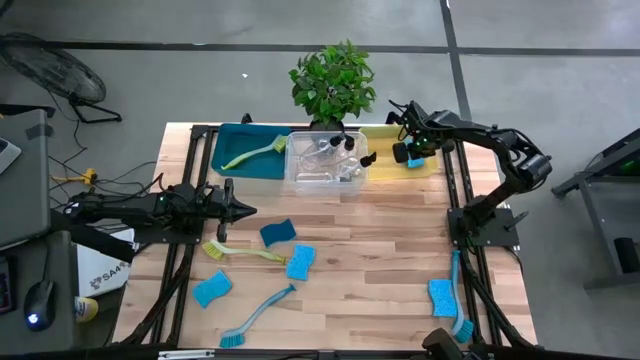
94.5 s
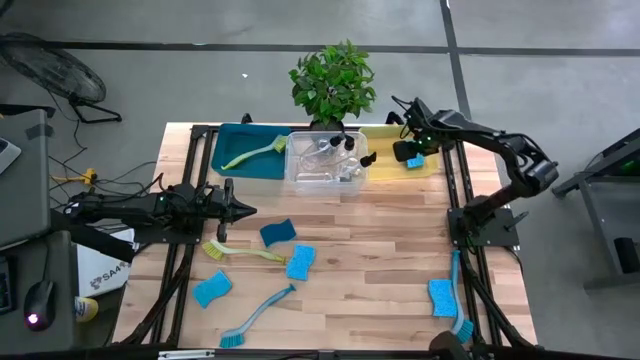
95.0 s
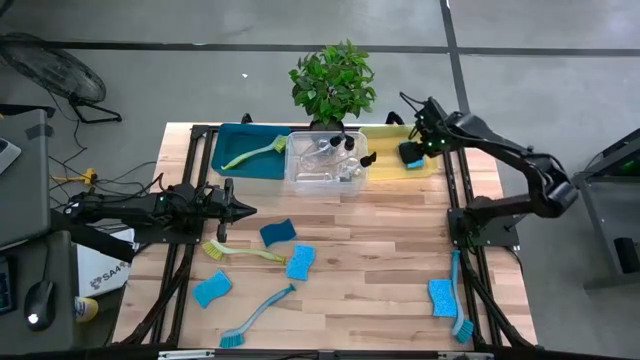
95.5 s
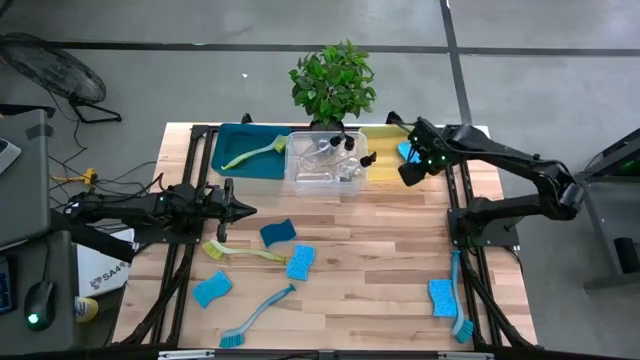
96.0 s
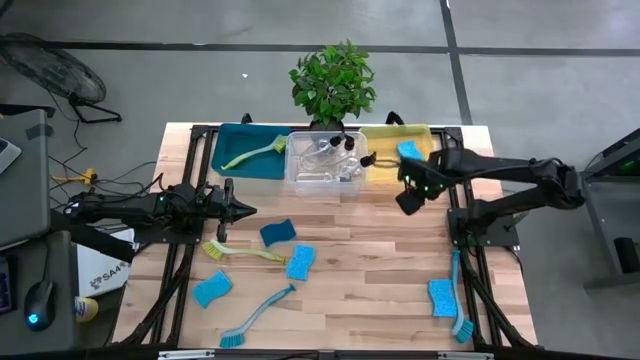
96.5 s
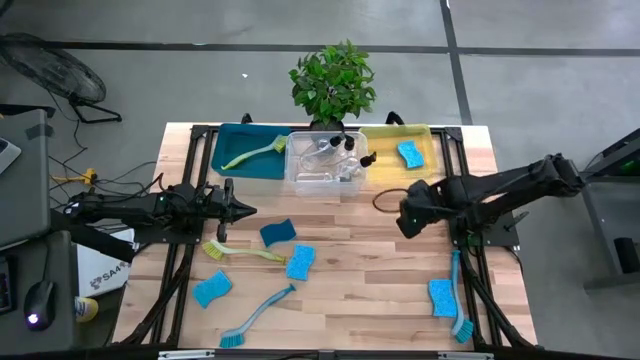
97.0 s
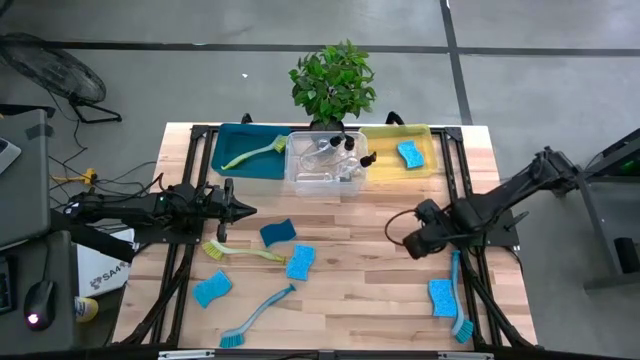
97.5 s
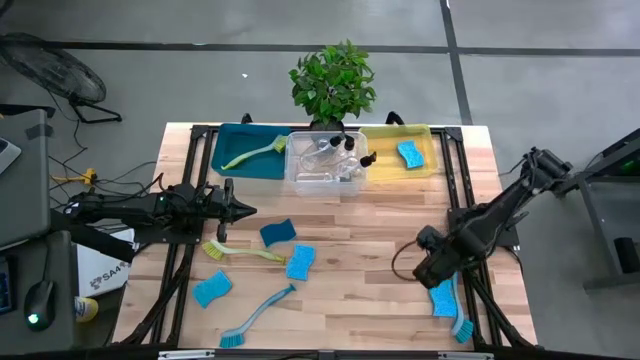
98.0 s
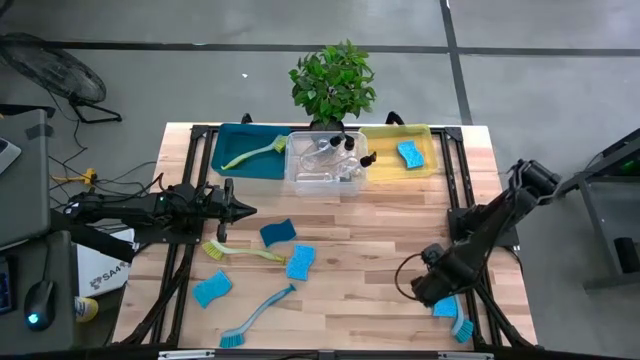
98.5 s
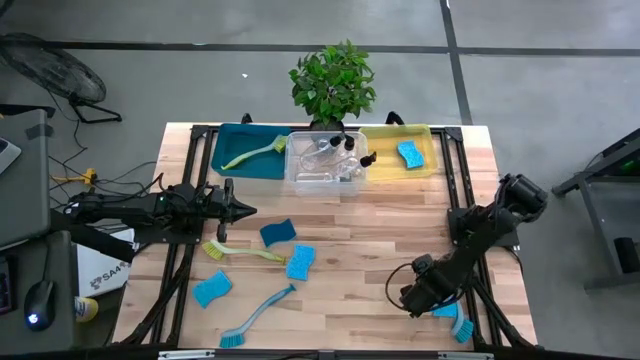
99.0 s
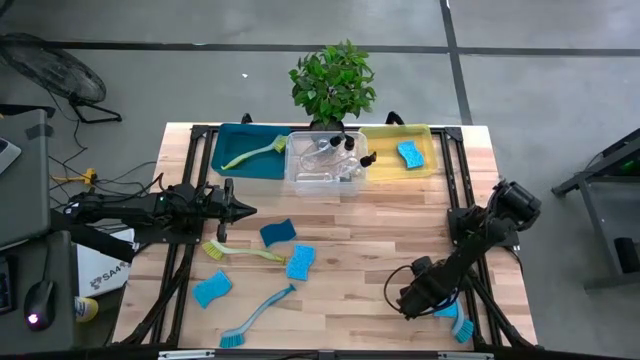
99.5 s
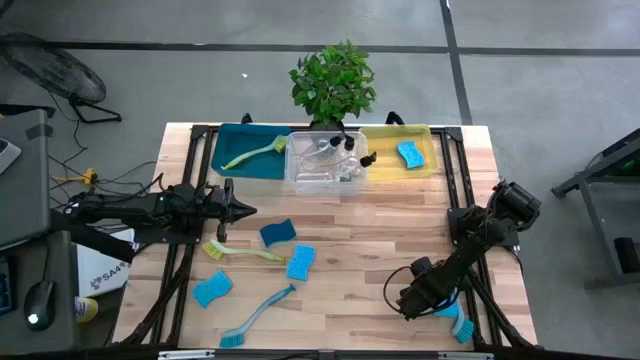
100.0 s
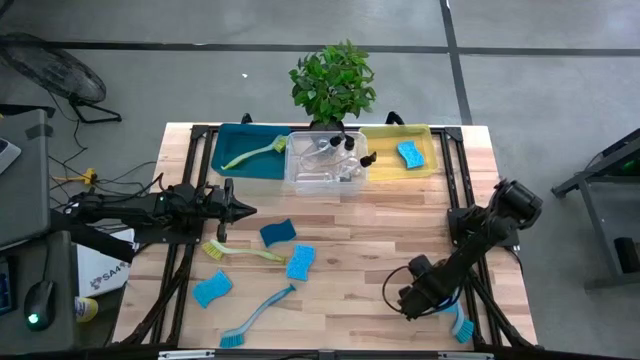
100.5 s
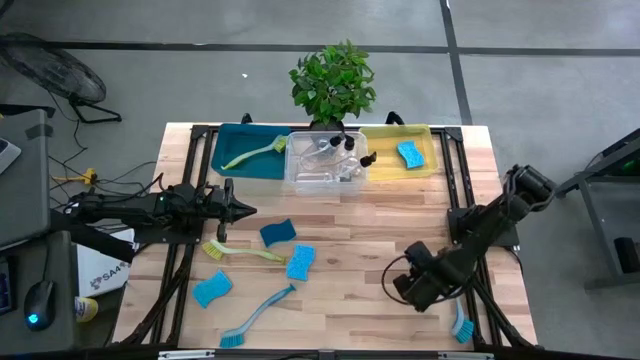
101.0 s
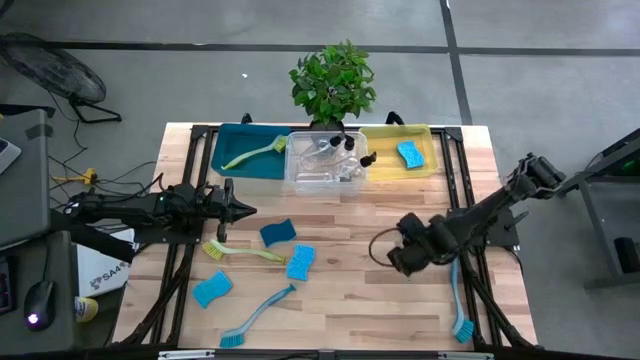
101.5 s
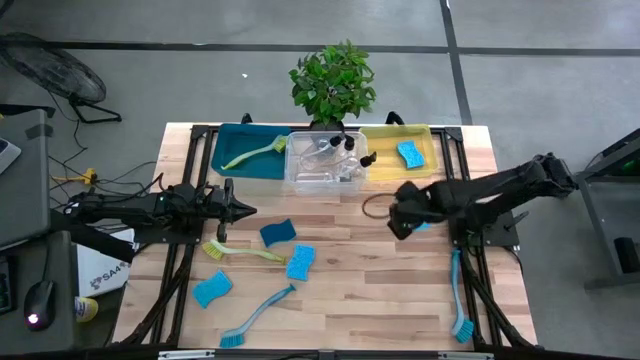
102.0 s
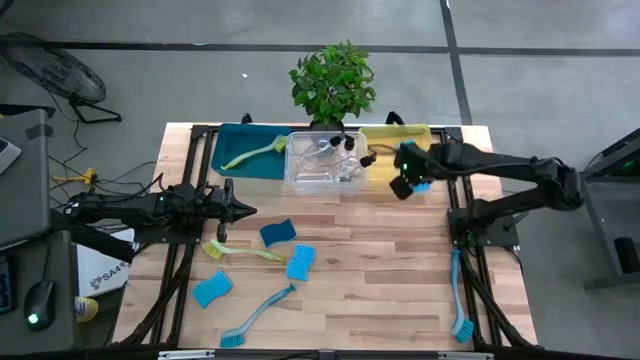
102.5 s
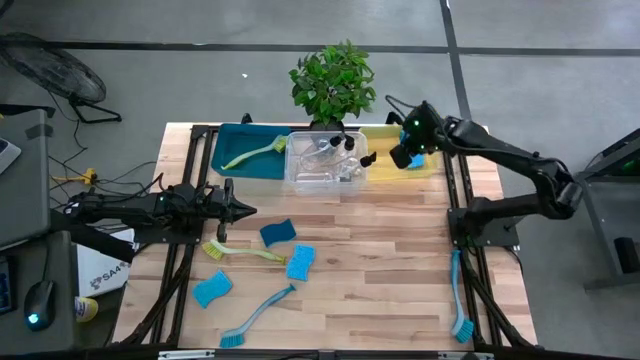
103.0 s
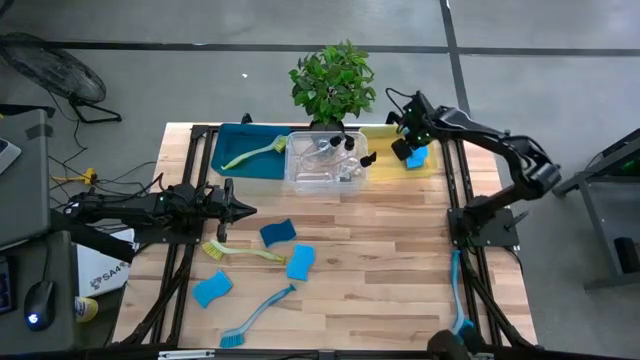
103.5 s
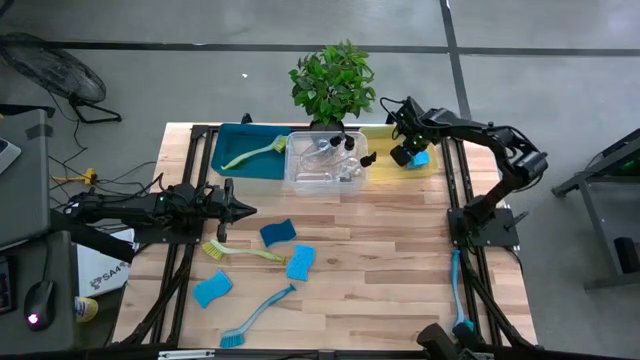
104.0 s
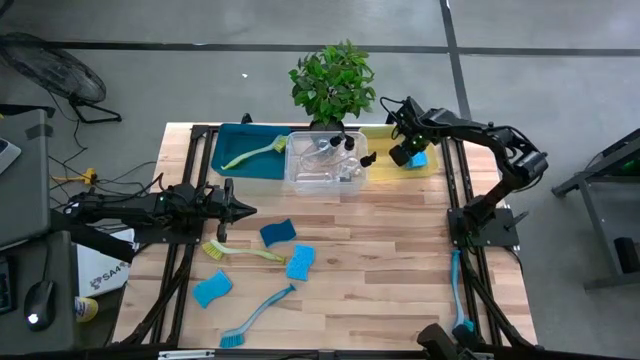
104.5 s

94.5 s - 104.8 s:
Task: Pick & Place Kitchen Sink Supplies
Put the light blue sponge into the yellow bin

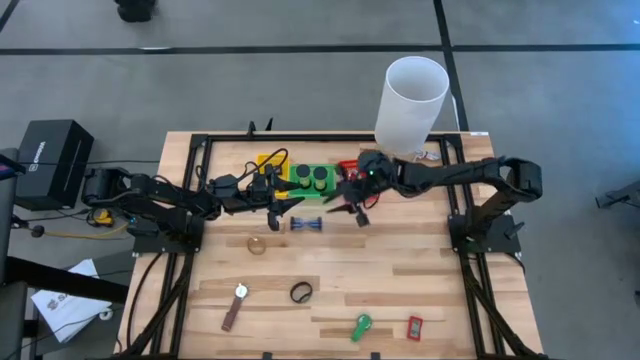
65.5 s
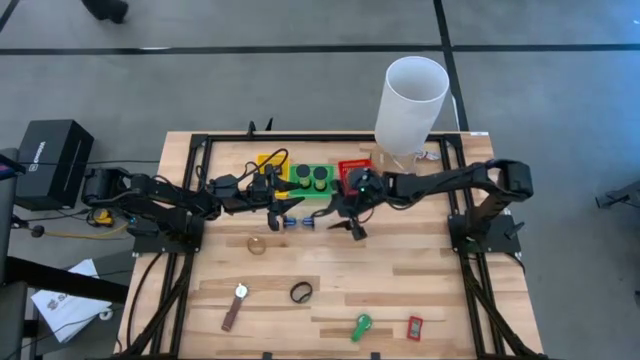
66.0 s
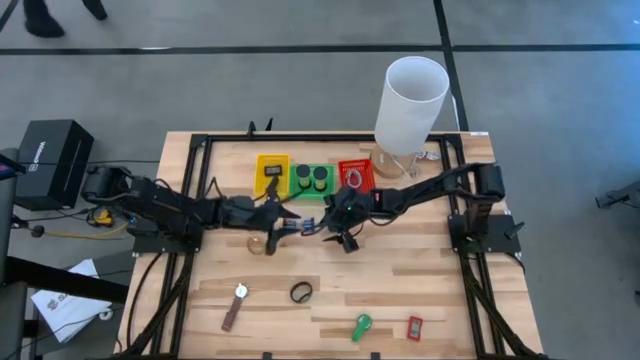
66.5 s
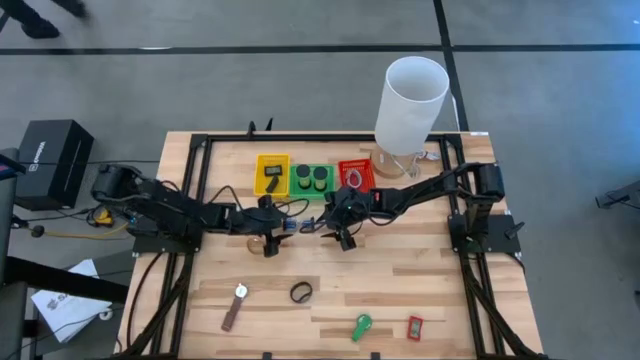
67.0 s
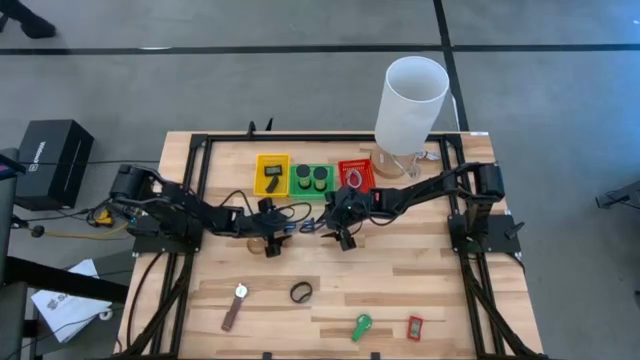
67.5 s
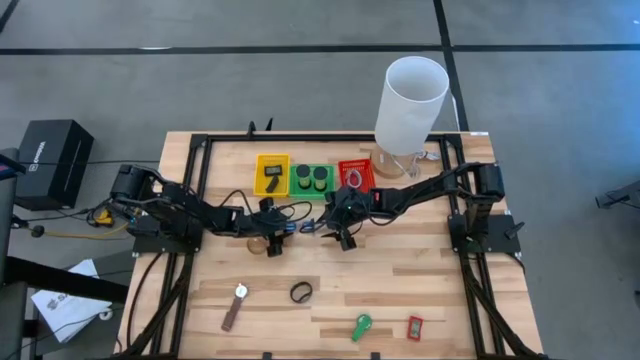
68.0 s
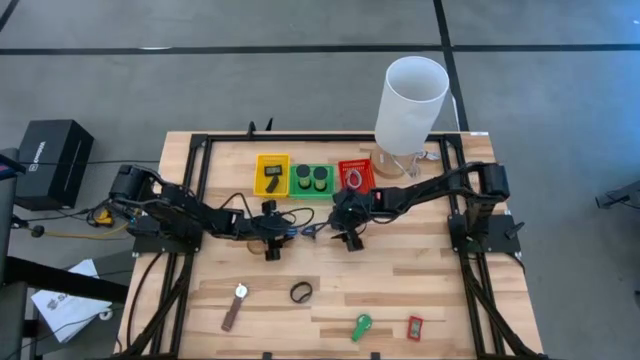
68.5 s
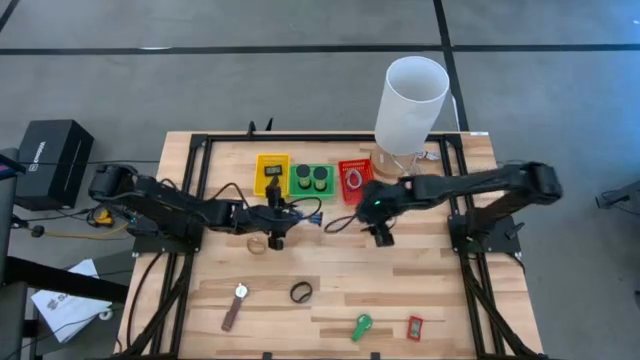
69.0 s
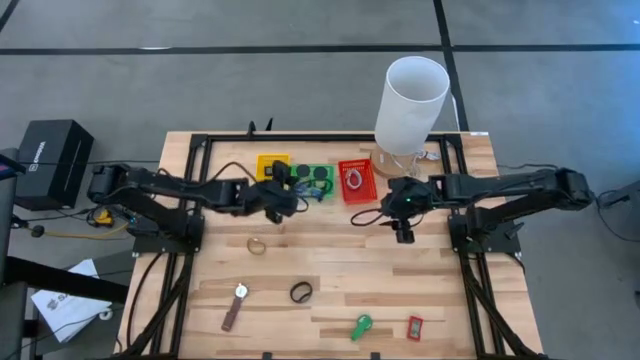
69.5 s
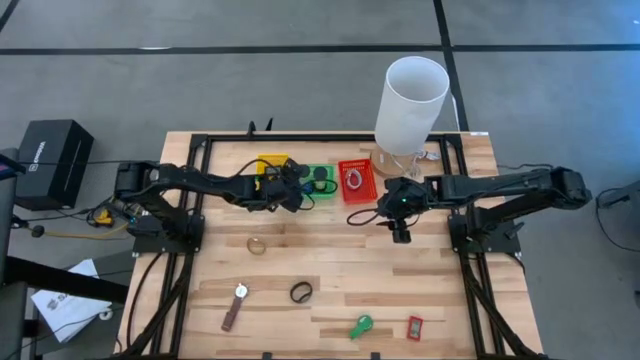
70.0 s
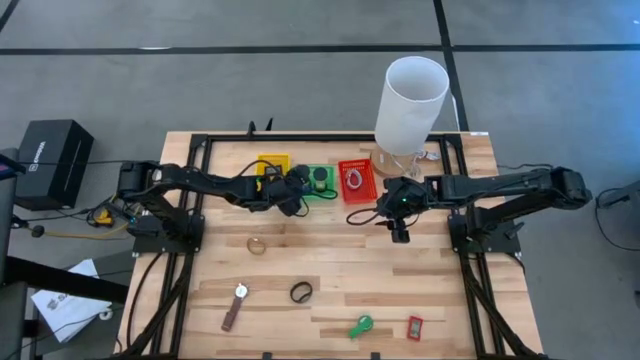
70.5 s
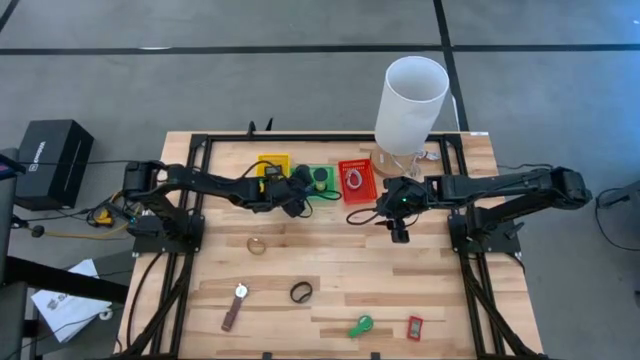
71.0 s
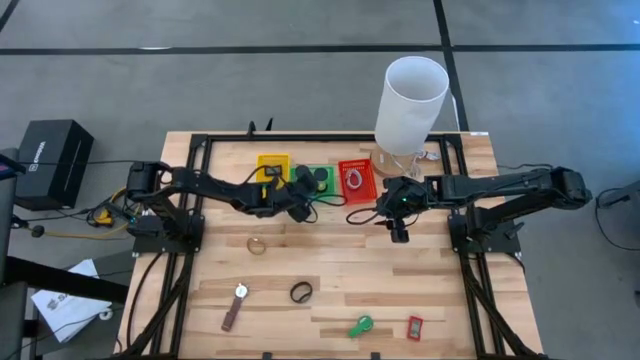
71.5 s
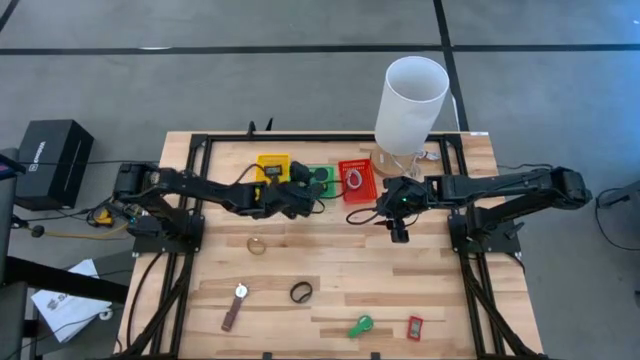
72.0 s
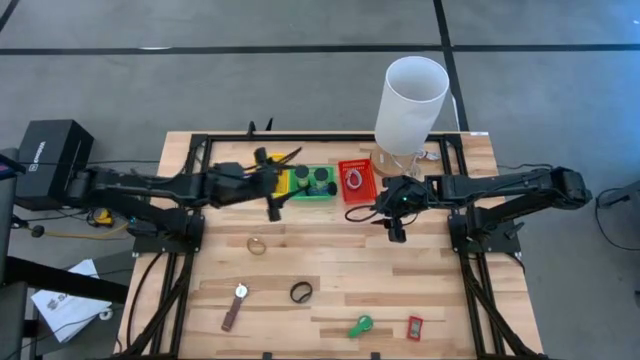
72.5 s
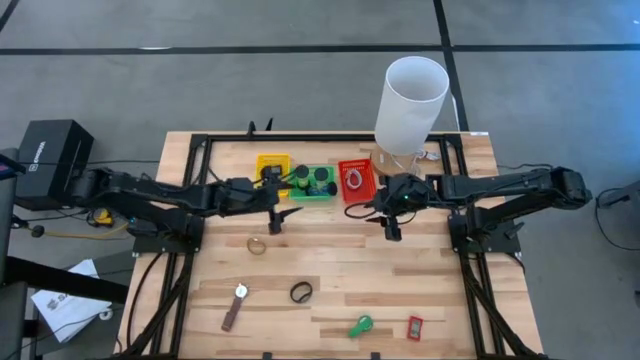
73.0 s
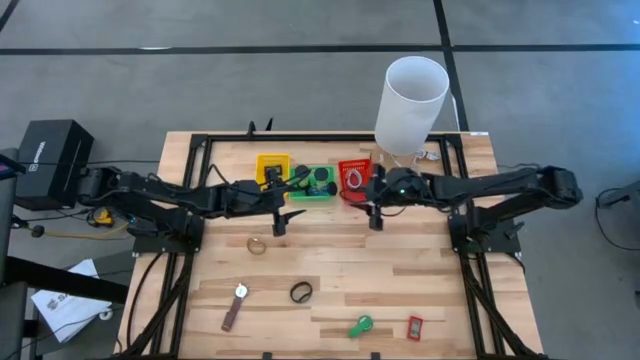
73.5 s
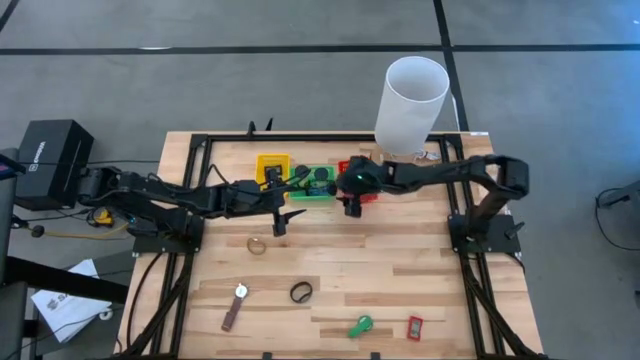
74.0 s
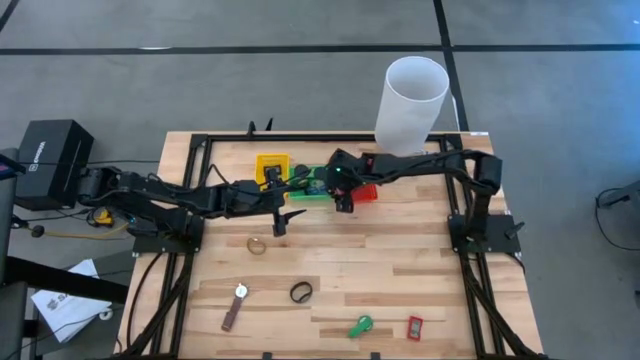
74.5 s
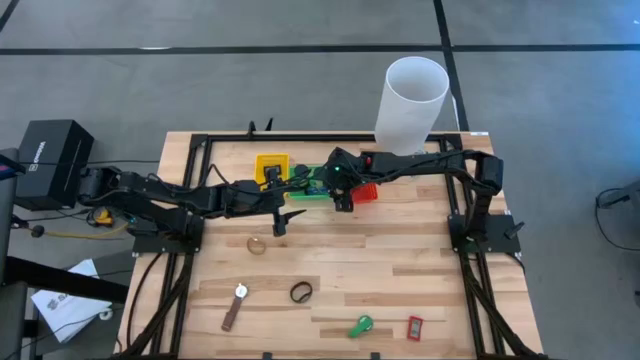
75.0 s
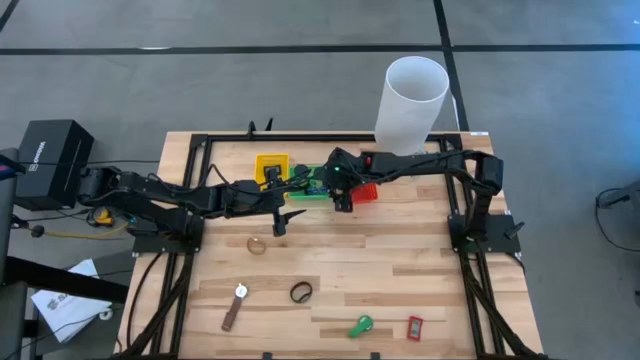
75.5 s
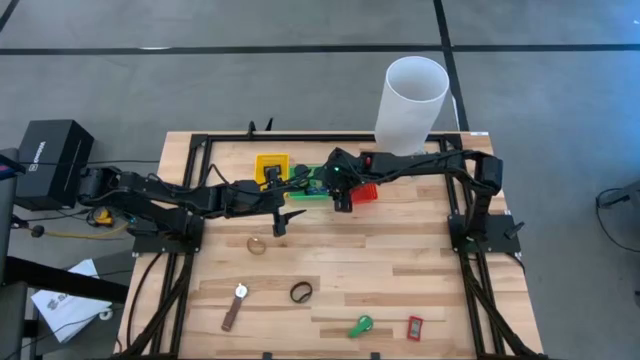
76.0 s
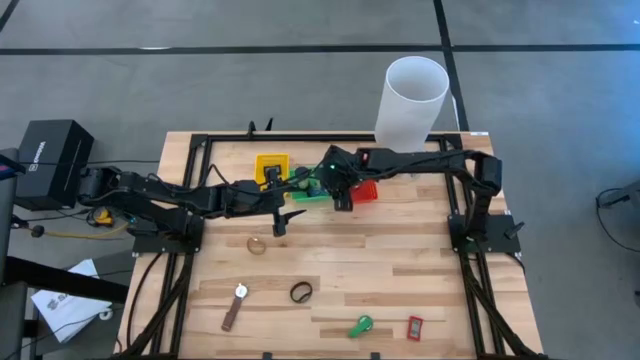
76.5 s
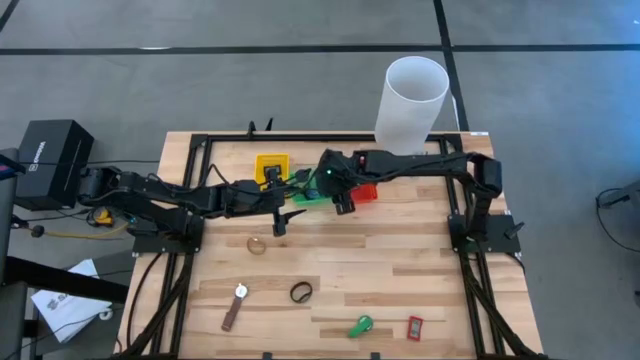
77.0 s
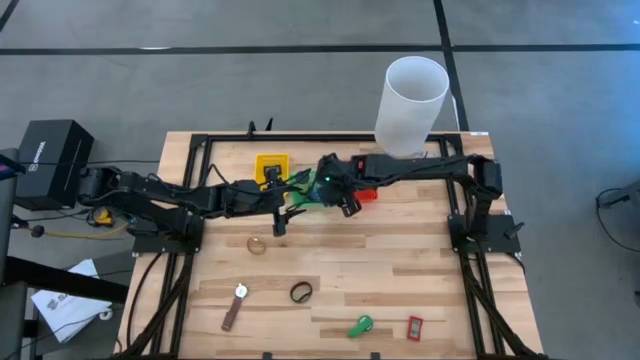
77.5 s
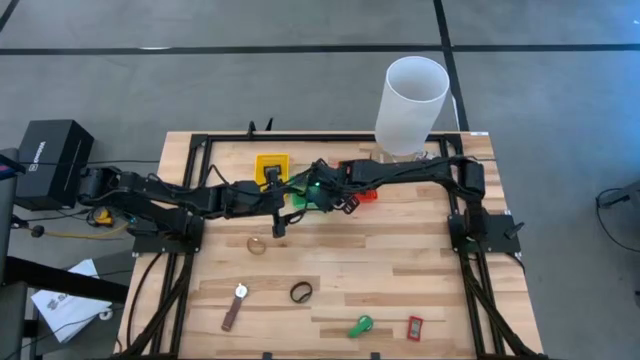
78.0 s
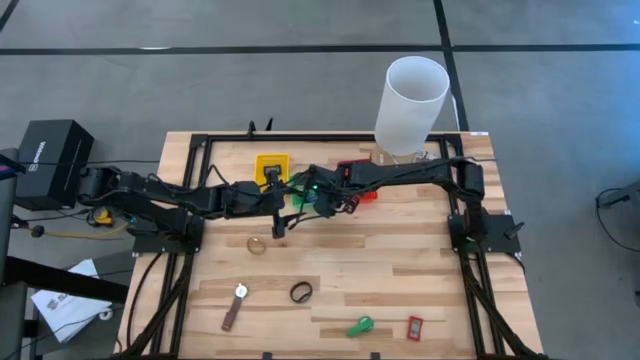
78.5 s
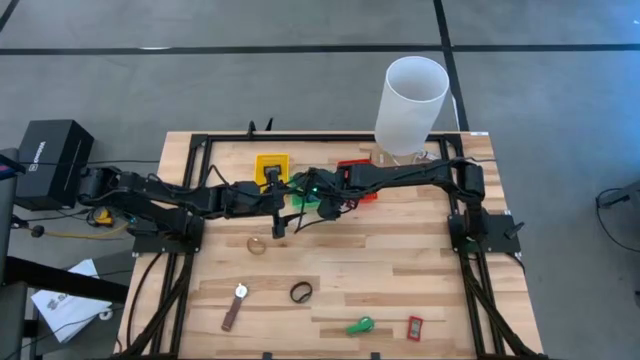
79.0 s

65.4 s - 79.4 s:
Task: Pick & Place Office items
Put the blue hourglass into the green basket
